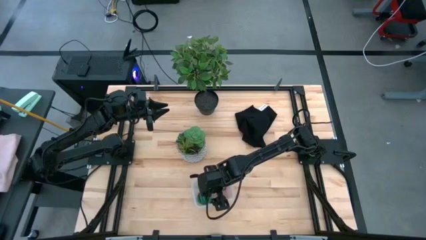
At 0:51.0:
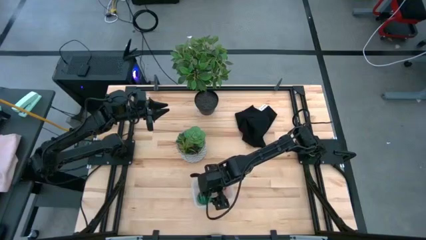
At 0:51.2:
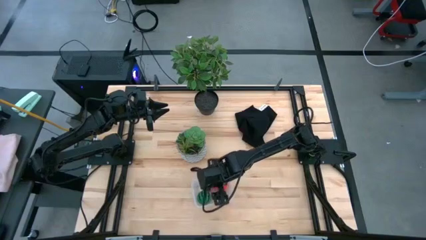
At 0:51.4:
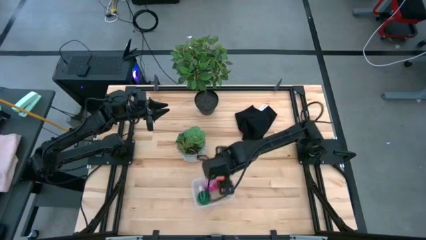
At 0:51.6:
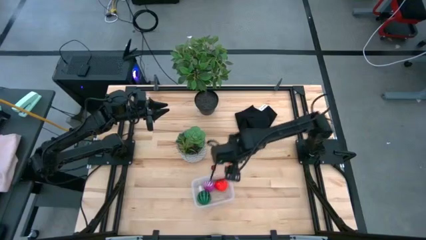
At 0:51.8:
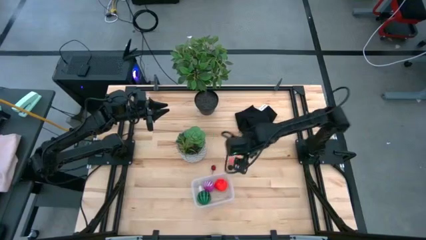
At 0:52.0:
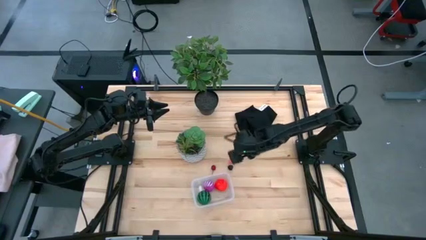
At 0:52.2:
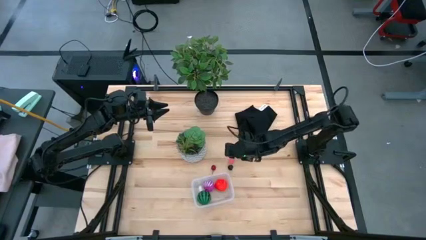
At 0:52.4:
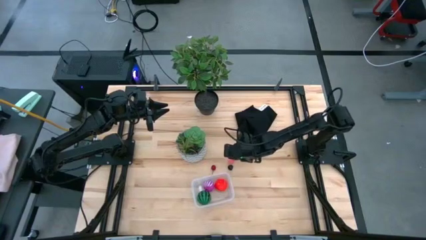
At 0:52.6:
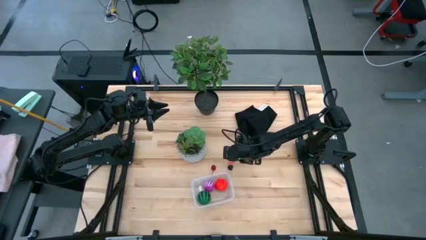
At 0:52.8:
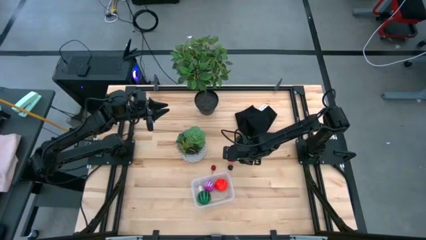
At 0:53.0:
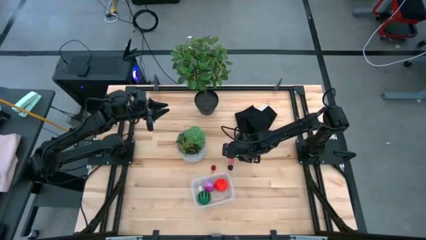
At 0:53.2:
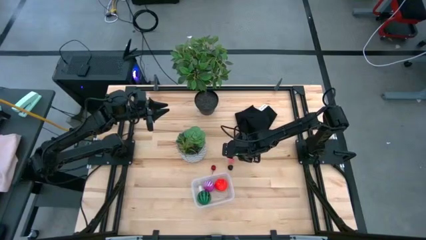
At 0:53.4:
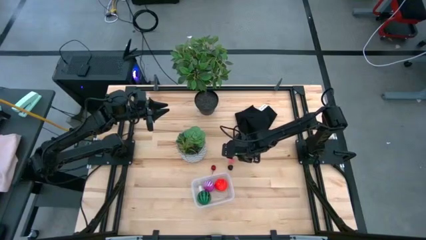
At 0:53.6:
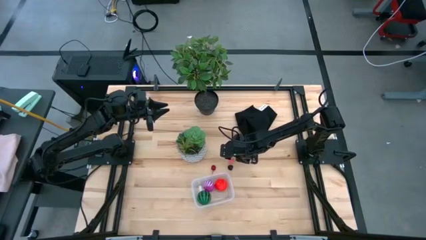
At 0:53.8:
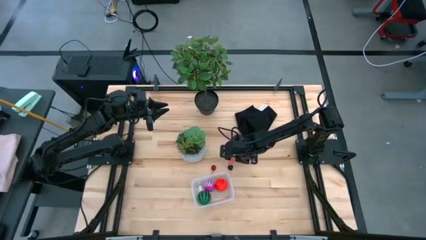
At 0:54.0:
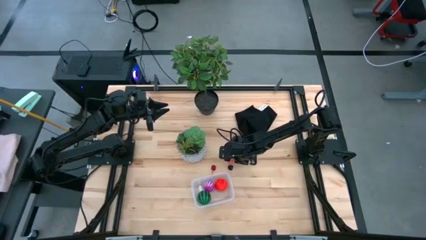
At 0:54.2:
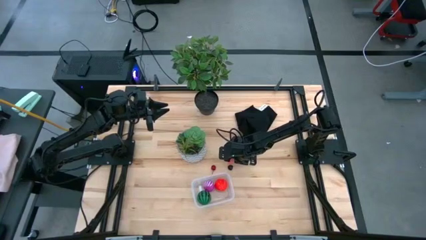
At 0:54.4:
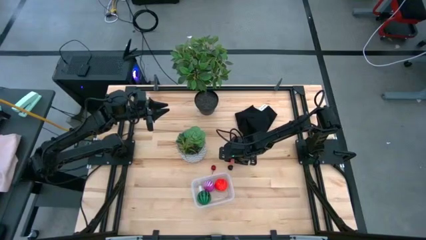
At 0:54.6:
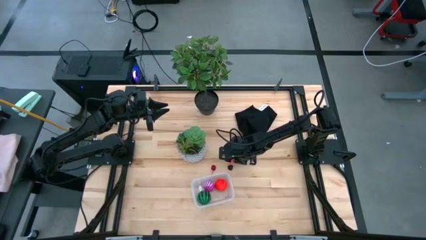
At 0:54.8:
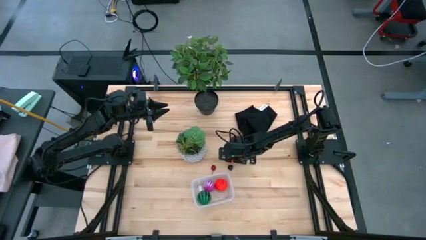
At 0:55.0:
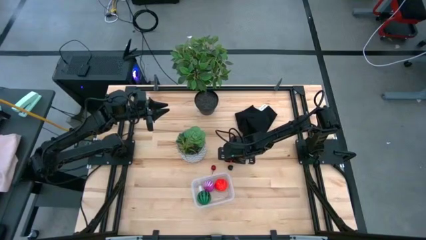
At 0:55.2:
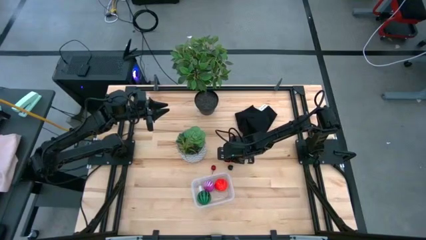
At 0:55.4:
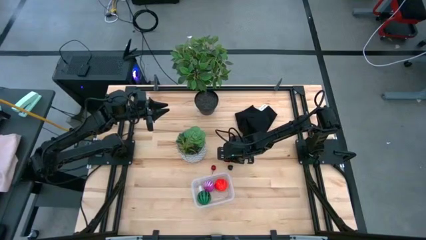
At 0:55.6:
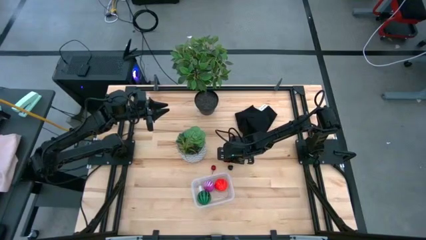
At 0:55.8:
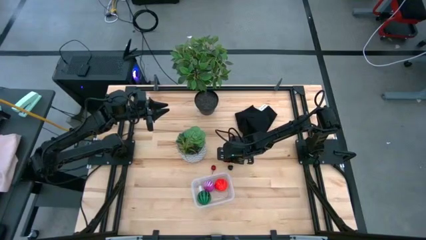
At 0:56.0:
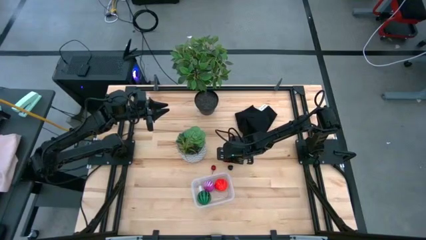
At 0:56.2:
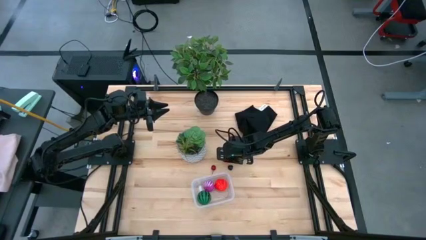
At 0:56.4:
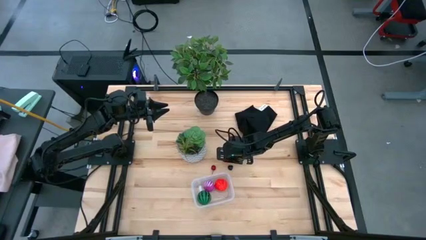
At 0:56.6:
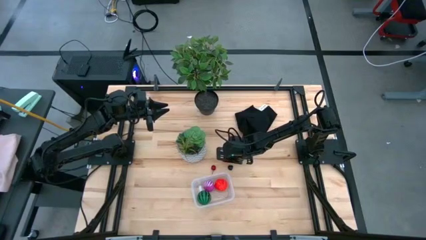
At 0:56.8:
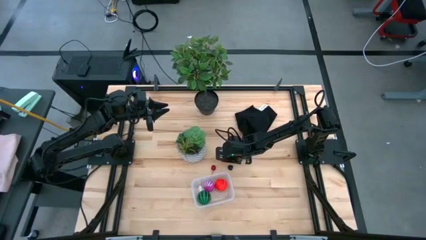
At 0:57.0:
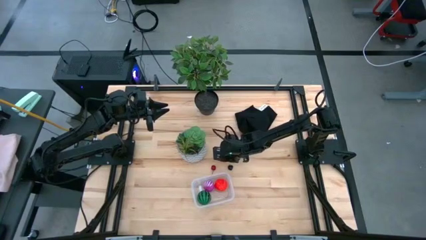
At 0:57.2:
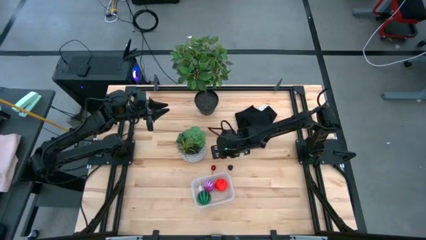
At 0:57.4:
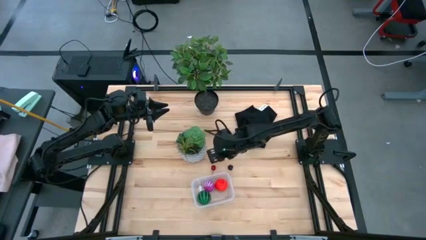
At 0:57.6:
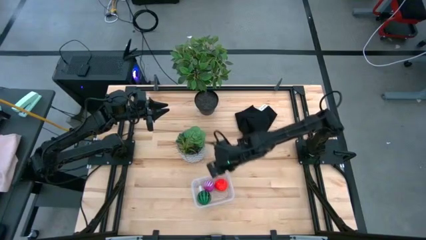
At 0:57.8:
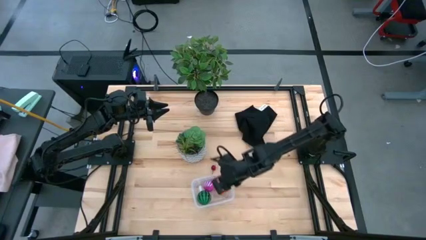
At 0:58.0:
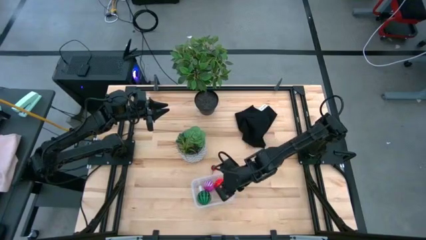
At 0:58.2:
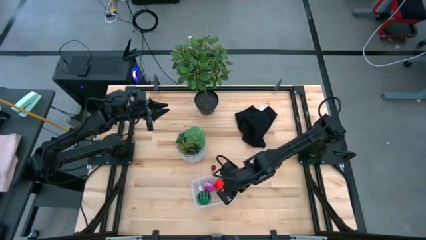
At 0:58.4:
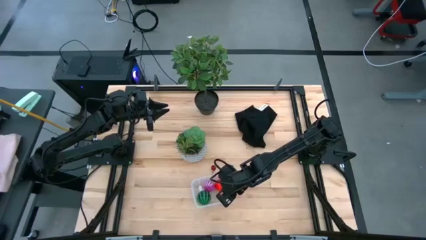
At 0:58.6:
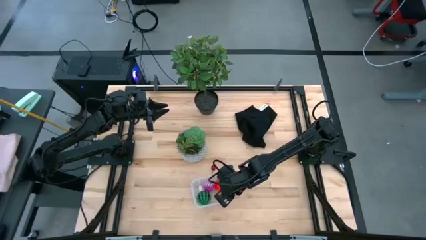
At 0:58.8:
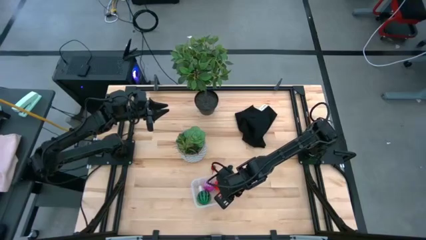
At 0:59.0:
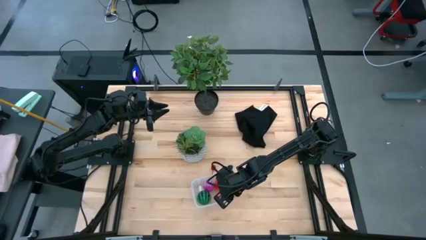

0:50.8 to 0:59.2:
Task: Pick and placing Produce into tupperware
Put the peach into the transparent bin

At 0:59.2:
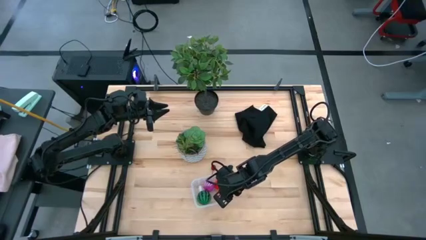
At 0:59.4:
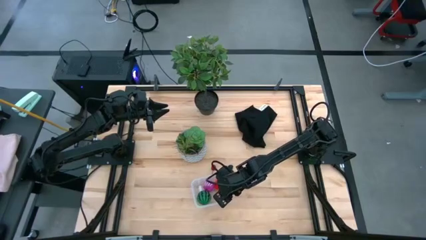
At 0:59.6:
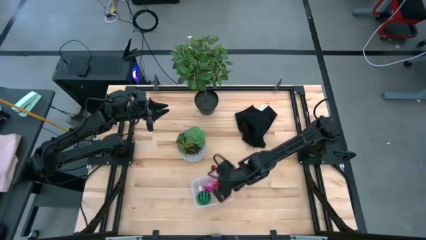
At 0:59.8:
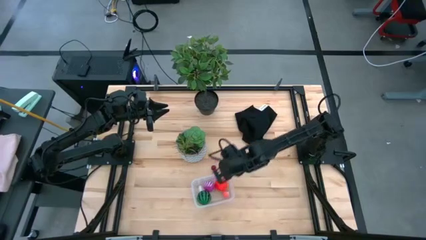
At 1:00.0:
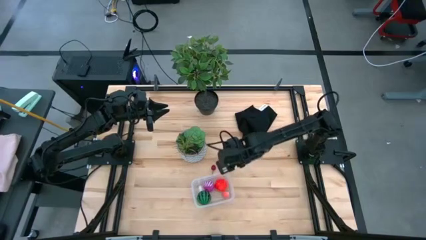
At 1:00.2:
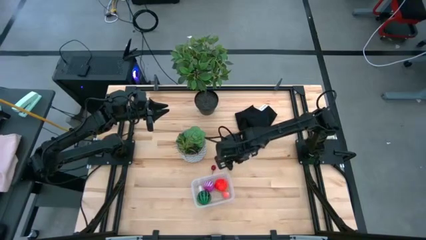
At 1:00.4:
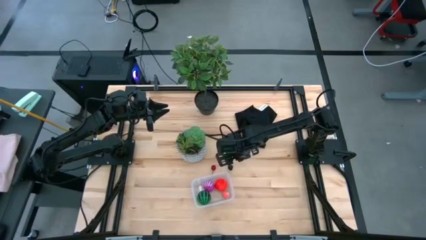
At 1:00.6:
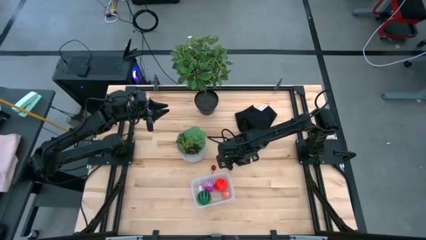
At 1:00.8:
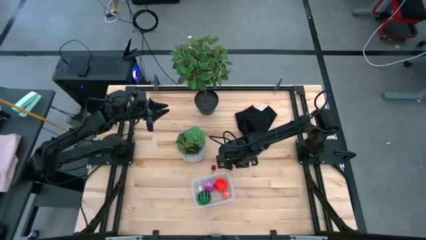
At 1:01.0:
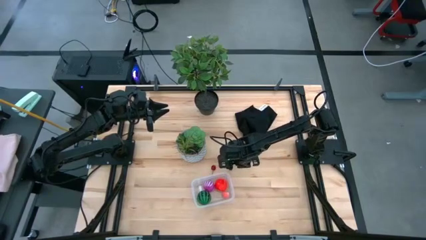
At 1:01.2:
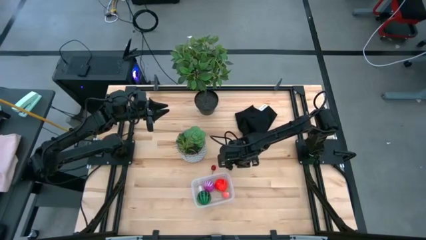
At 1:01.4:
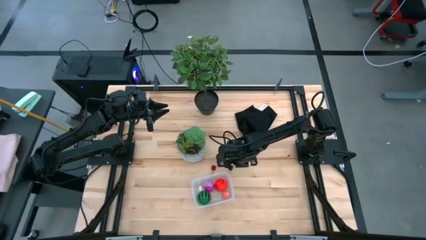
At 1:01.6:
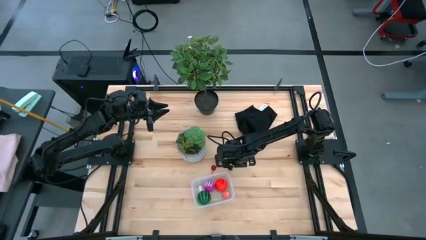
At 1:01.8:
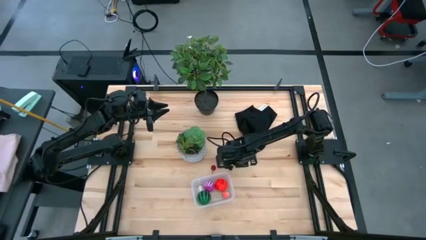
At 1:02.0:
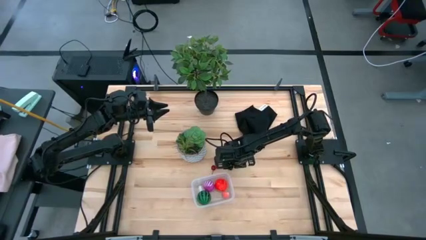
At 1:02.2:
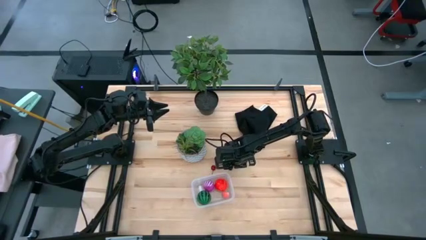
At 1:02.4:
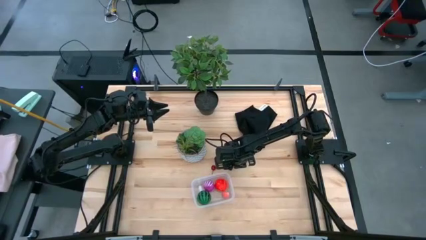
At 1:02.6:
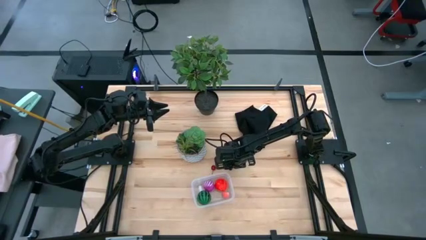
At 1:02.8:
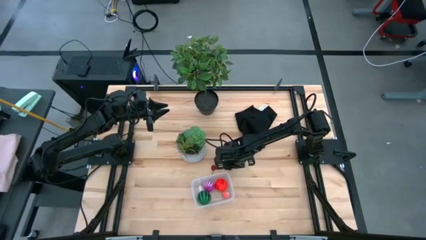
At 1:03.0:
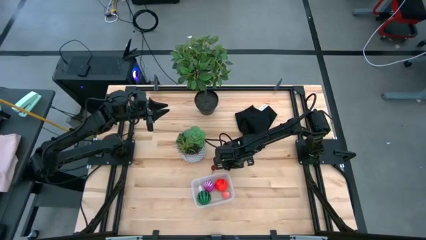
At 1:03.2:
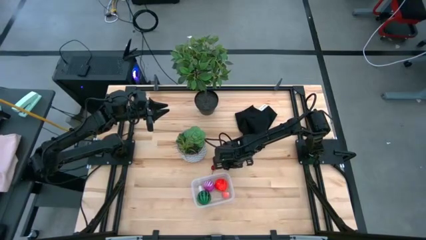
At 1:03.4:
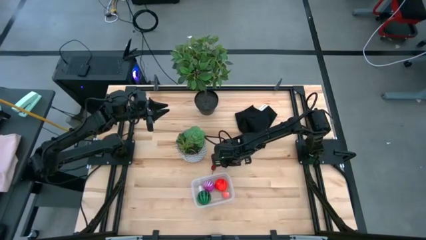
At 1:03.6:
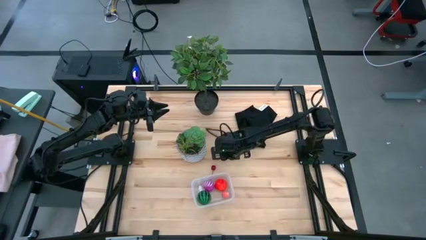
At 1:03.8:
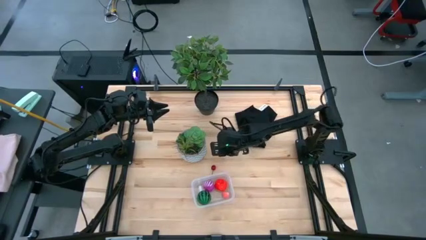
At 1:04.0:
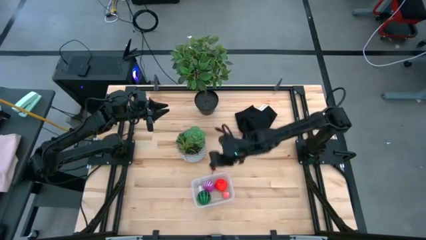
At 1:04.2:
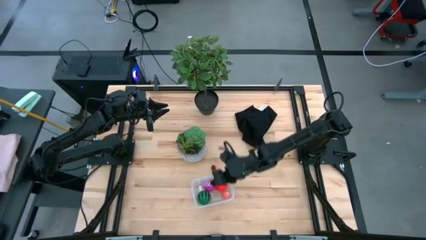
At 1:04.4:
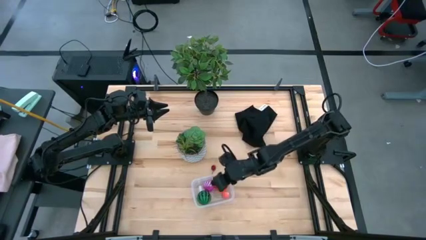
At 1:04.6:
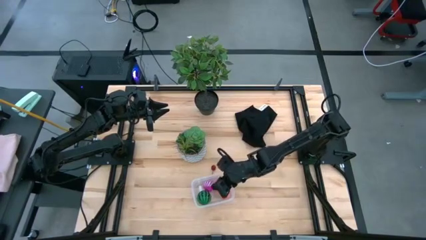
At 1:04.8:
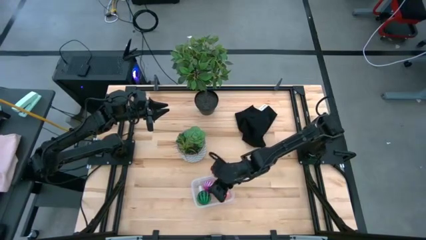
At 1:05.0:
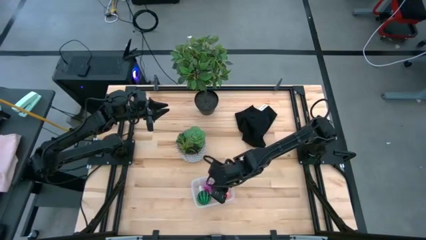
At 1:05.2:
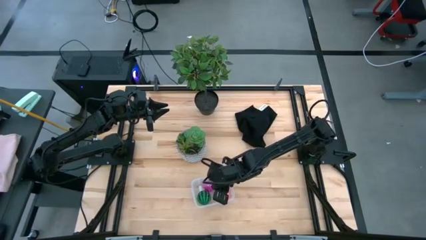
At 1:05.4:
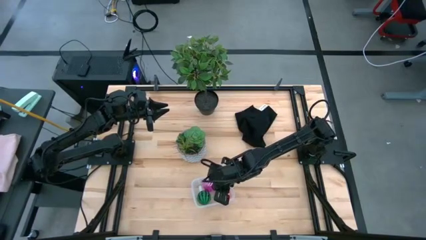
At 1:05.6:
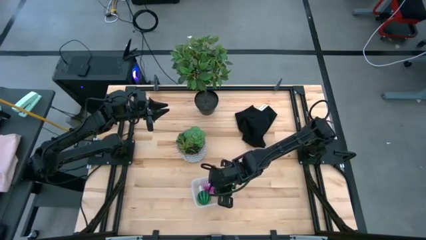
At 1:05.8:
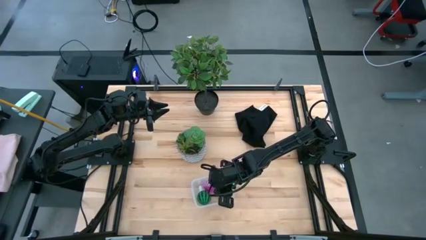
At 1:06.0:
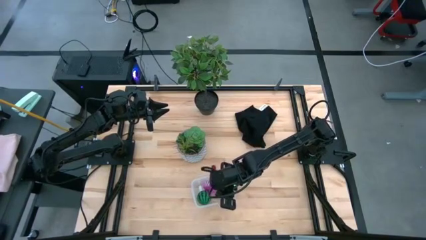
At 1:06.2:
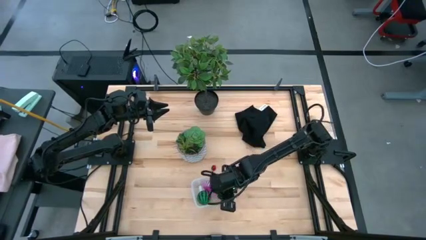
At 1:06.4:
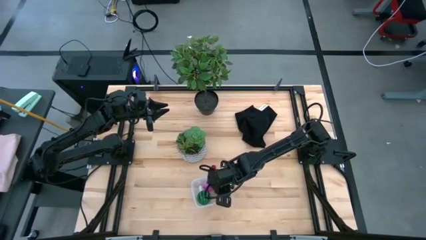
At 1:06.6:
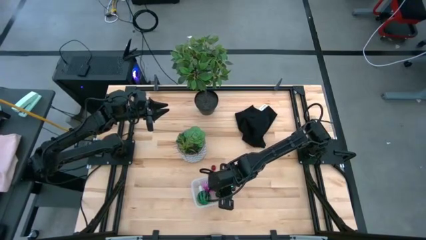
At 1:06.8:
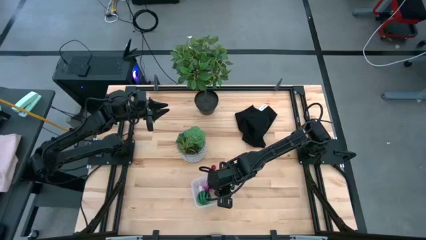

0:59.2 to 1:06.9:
Put the black cherry into the transparent bin
